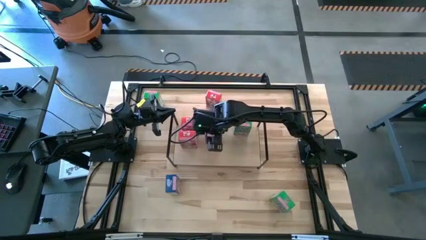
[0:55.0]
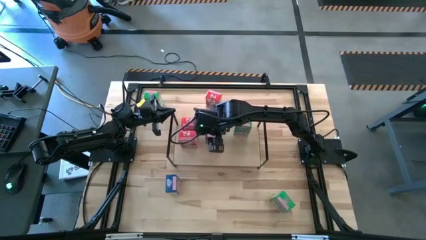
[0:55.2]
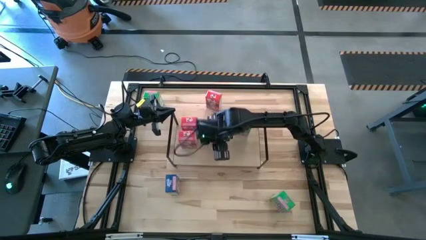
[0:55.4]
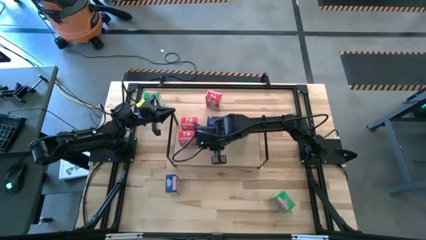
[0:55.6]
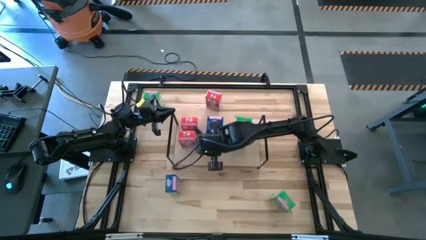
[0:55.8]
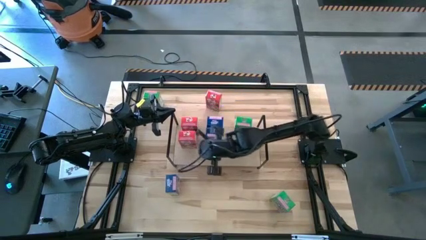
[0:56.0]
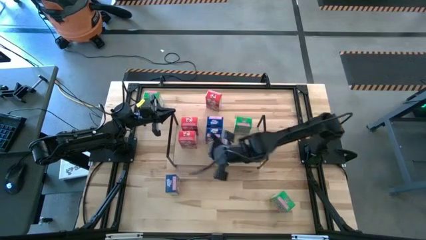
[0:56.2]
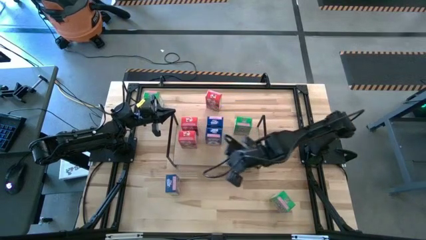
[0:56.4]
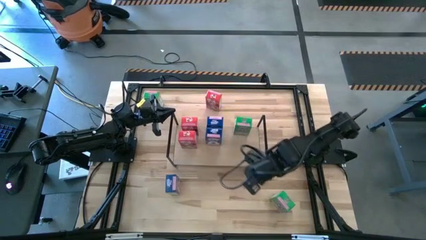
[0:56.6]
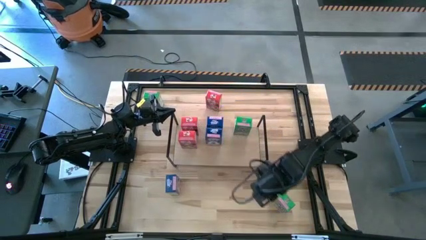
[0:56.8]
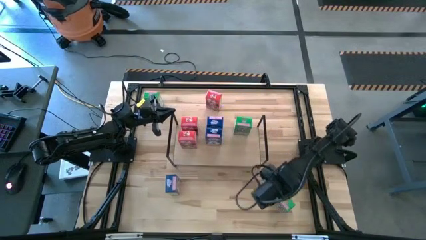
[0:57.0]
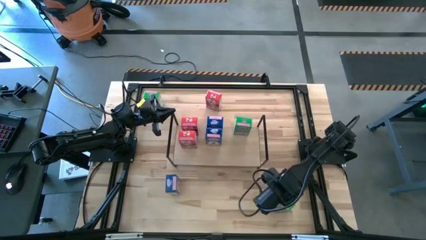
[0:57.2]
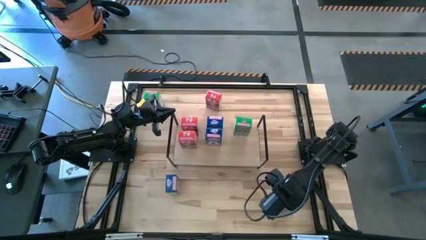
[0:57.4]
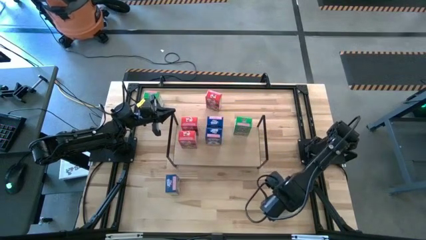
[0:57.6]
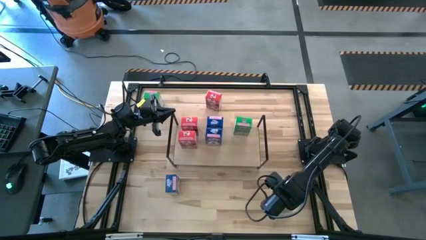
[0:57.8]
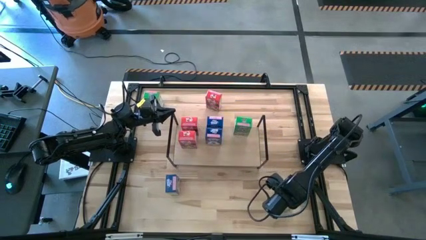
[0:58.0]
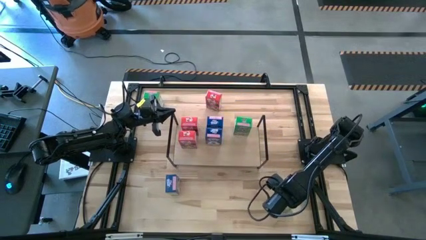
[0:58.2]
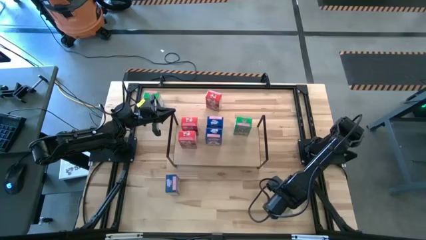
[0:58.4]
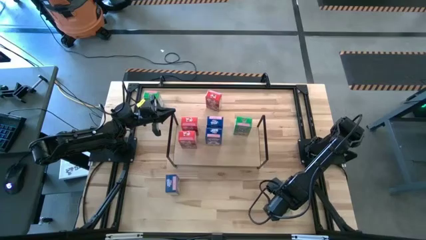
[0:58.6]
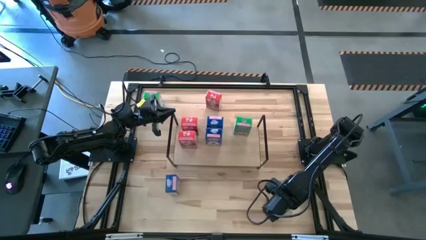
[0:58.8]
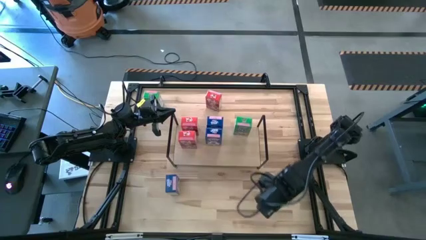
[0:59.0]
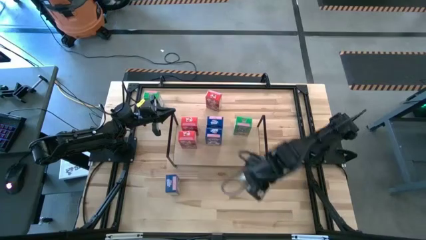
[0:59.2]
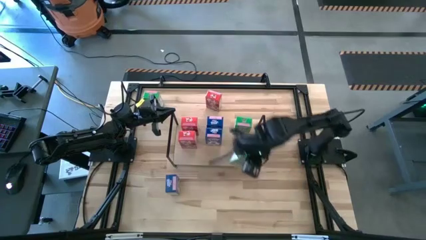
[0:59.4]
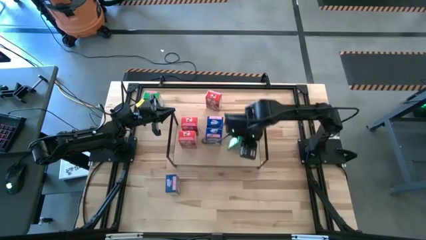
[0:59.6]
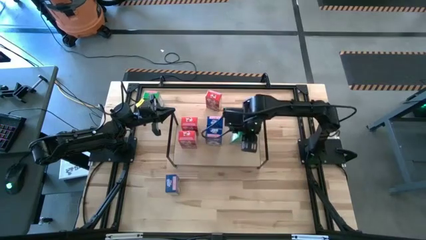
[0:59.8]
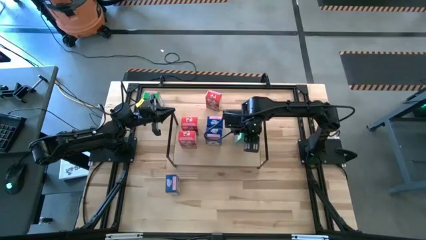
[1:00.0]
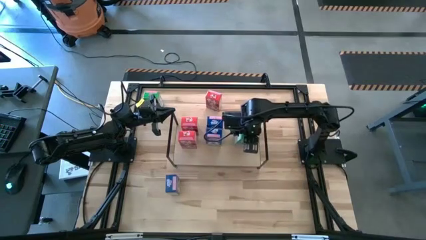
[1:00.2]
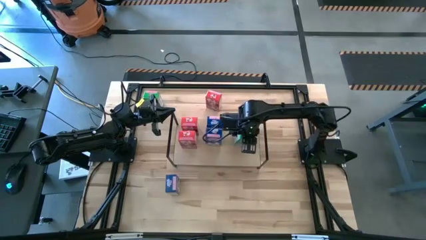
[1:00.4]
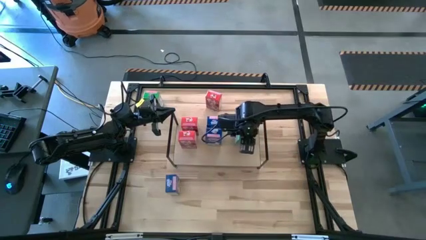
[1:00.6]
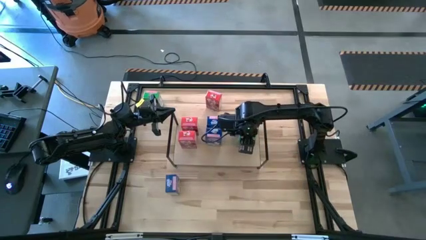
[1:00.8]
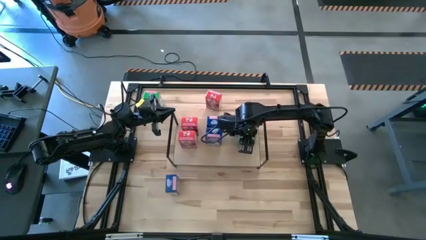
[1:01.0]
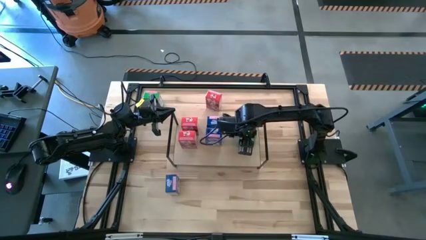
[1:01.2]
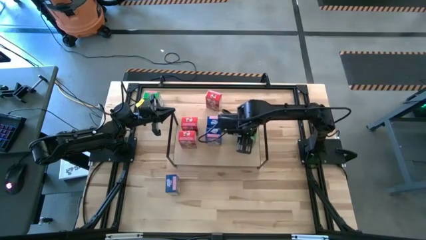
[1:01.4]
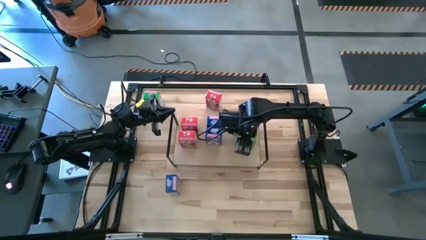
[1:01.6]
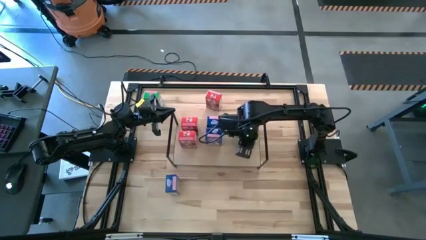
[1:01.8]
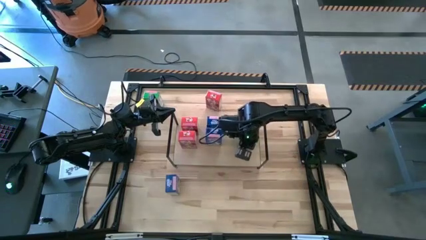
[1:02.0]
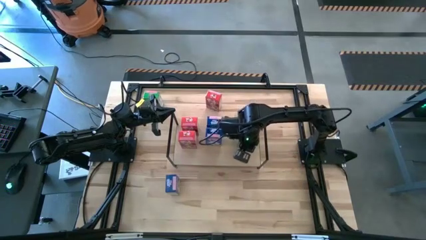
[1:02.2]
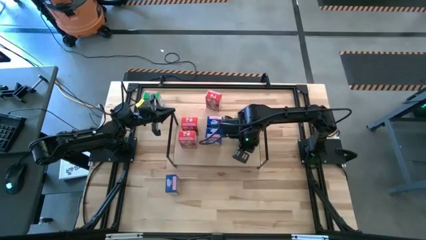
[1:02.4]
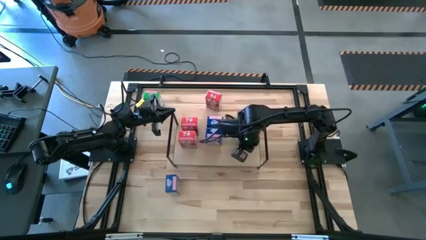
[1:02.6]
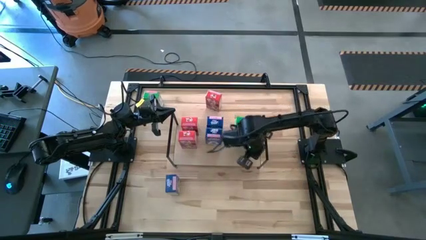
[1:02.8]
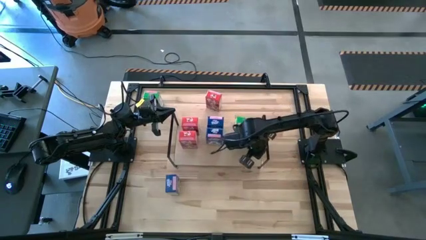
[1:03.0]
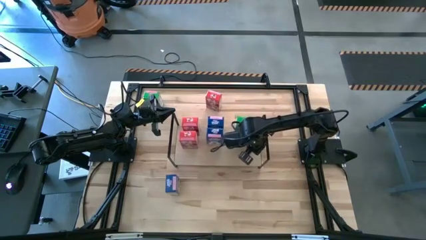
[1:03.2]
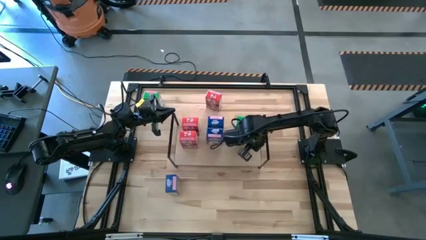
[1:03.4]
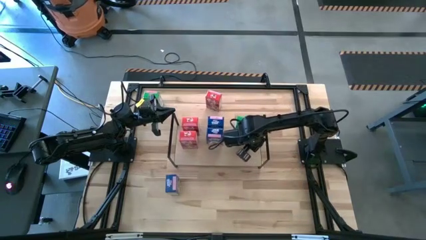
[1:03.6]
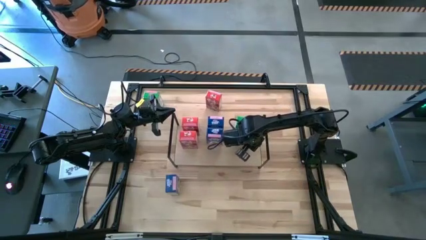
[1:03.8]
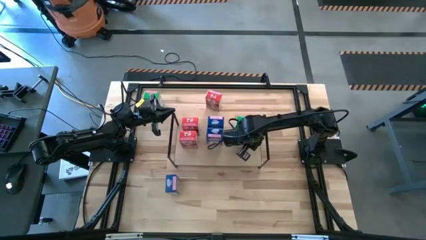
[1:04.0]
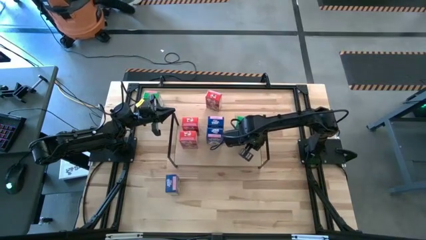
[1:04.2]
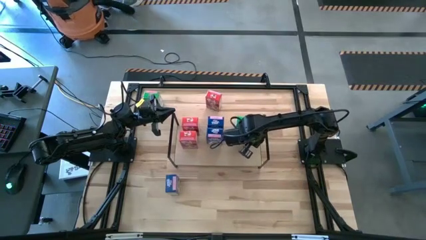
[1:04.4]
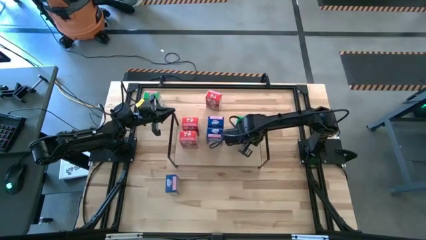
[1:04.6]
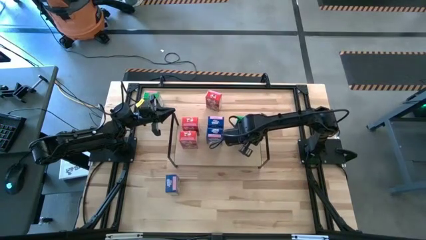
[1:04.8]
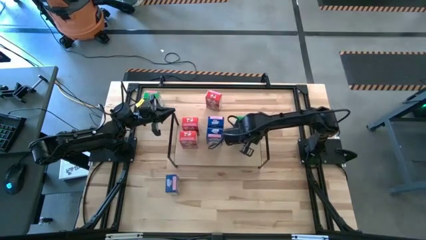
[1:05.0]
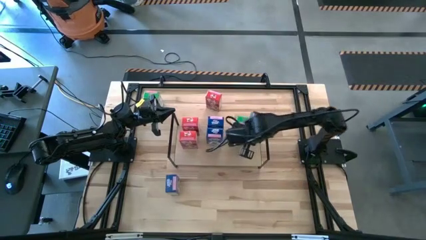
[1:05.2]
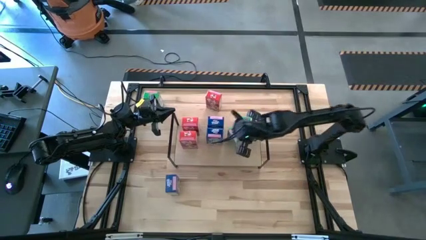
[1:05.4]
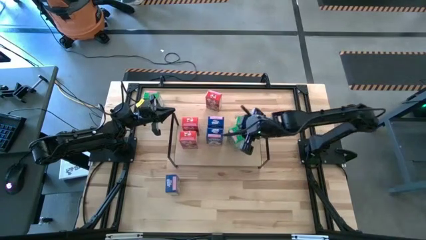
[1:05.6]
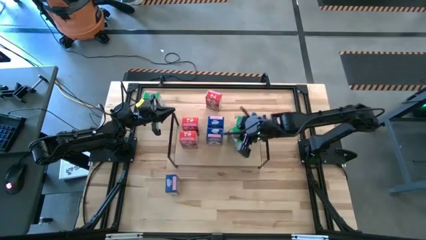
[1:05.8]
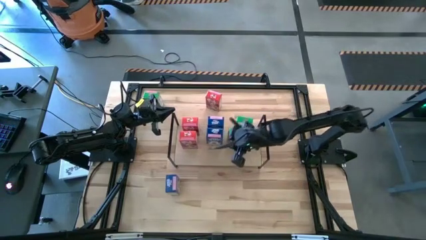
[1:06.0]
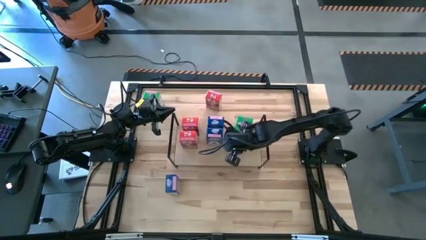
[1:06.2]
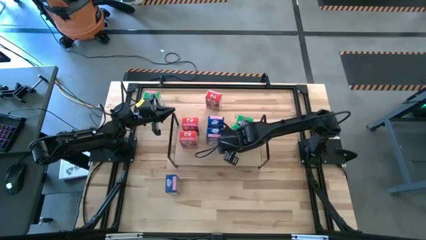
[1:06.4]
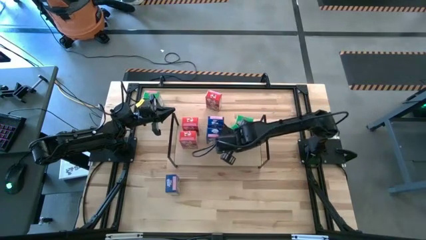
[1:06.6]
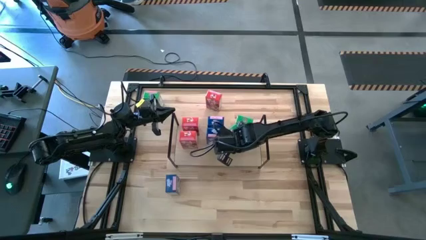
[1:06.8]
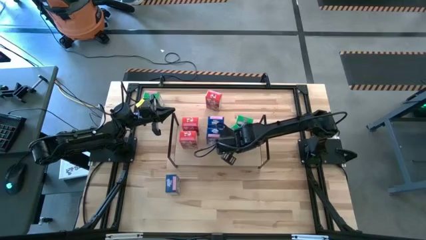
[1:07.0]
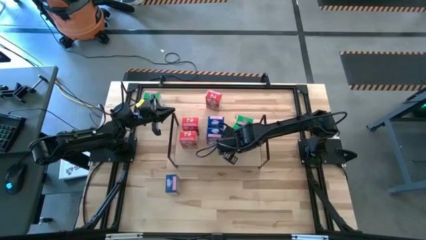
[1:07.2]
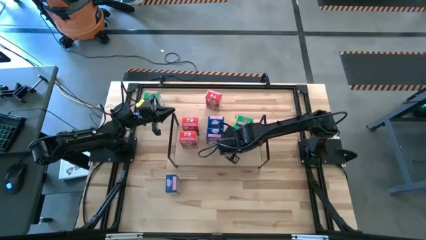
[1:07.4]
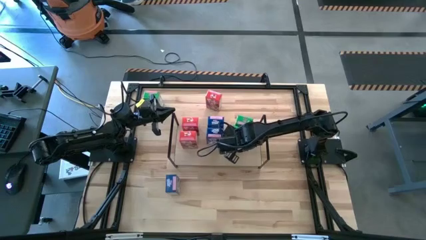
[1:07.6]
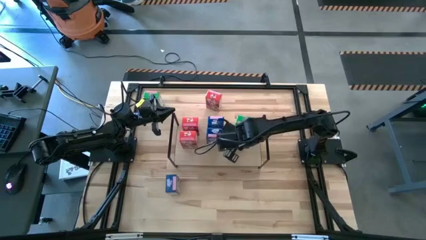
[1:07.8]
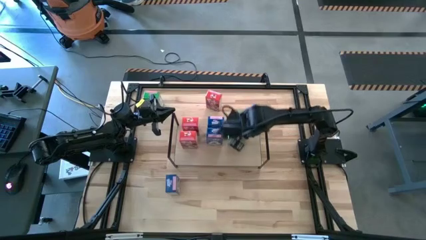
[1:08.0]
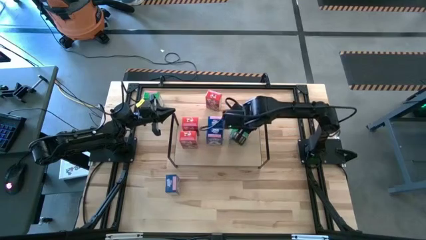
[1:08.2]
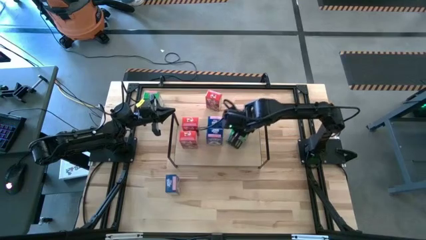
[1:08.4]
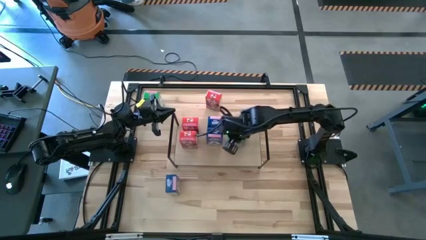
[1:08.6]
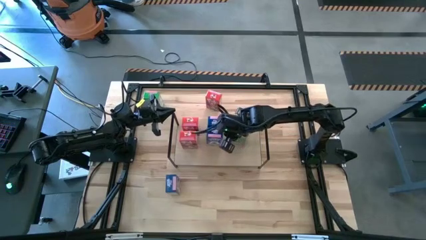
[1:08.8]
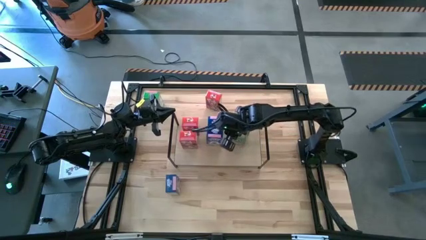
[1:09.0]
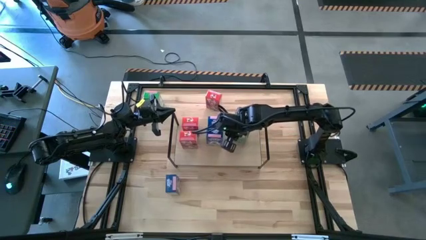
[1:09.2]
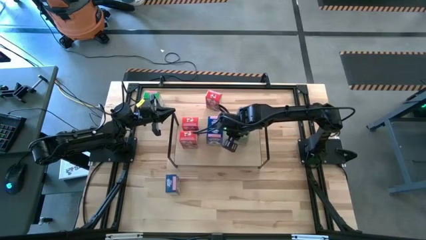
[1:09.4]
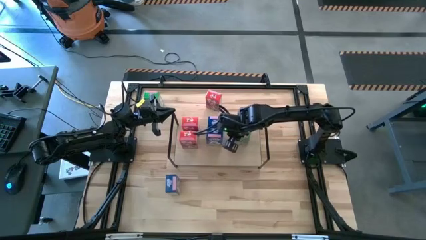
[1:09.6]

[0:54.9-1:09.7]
Task: Stack cereal on shelf
Put the bottom green cereal box on the shelf

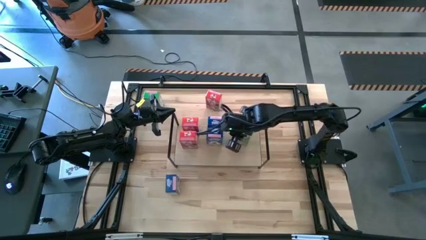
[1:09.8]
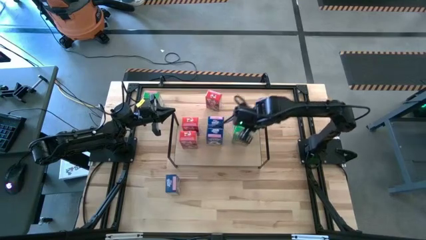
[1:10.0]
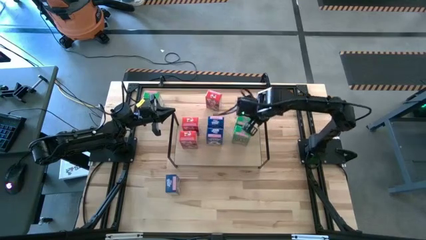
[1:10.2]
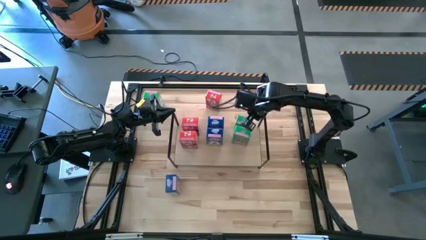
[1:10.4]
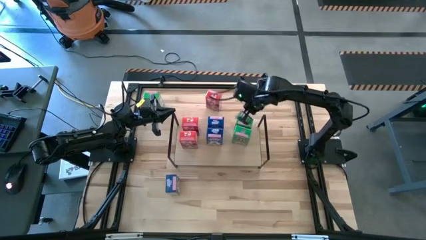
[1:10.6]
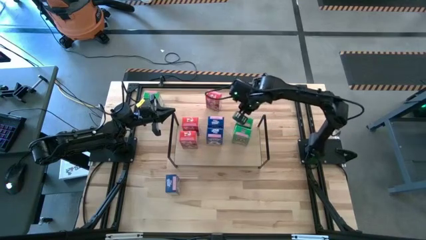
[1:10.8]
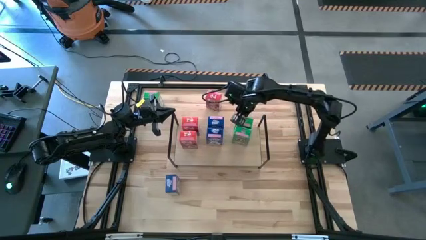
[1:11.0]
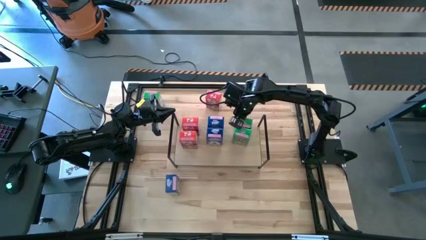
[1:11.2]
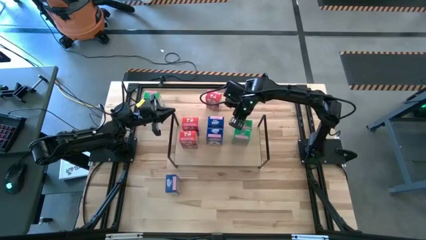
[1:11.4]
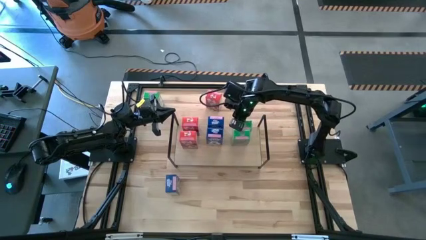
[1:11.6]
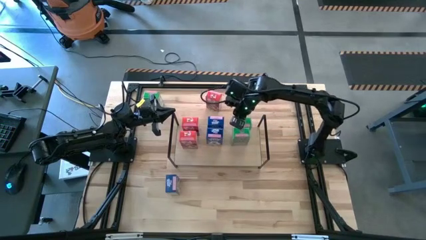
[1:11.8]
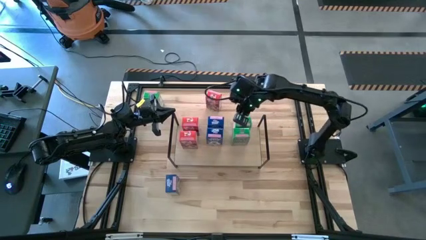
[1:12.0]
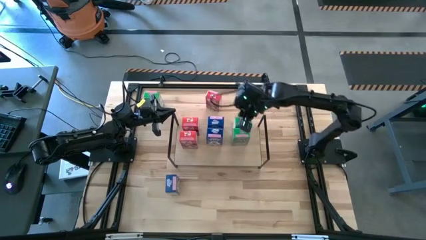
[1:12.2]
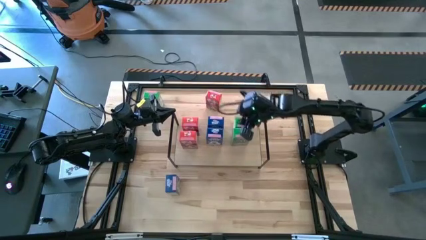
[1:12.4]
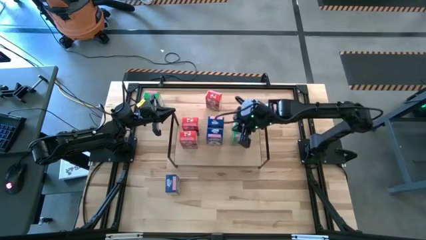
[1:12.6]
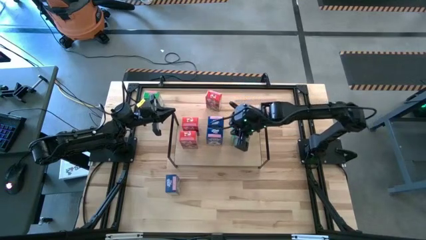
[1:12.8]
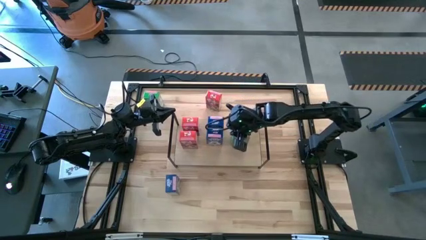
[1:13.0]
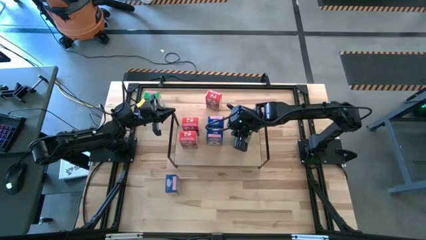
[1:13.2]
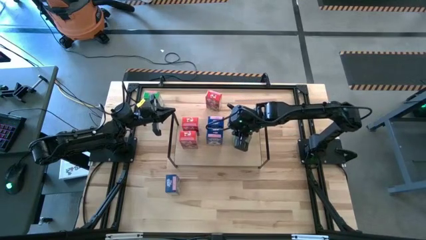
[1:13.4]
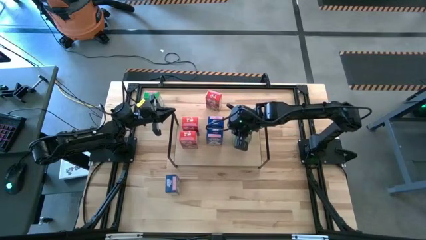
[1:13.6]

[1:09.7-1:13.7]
Adjust the green cereal boxes
